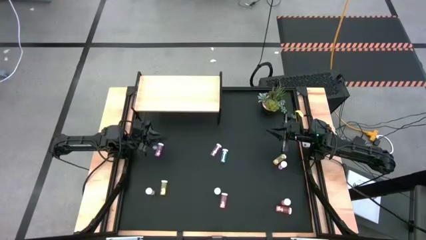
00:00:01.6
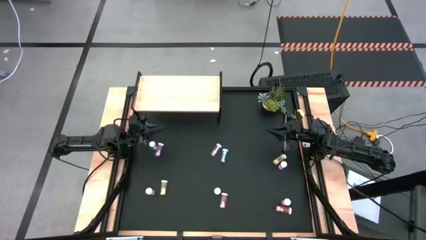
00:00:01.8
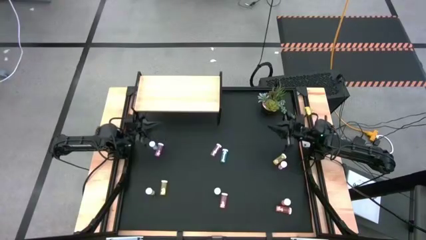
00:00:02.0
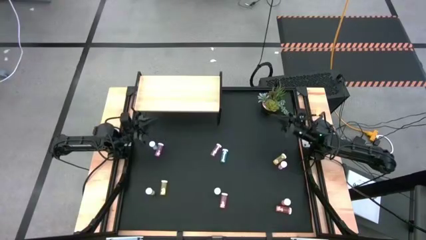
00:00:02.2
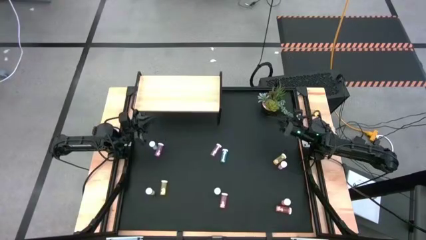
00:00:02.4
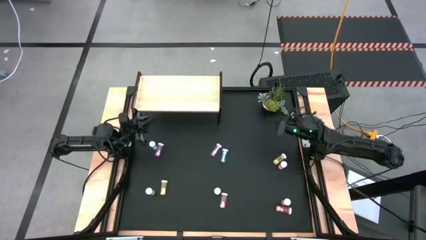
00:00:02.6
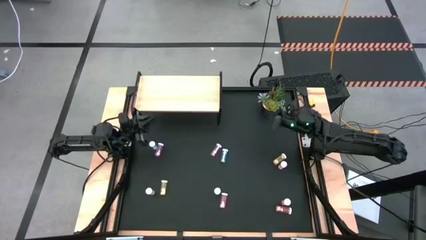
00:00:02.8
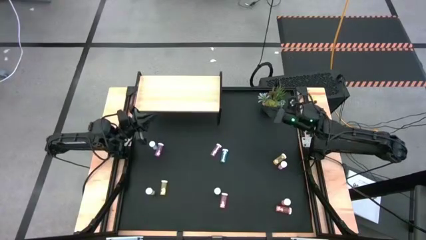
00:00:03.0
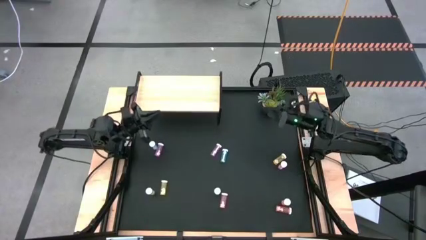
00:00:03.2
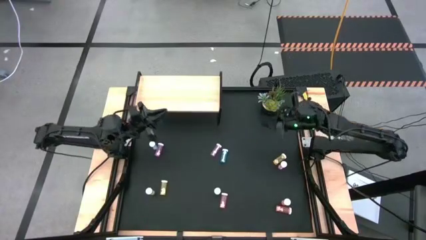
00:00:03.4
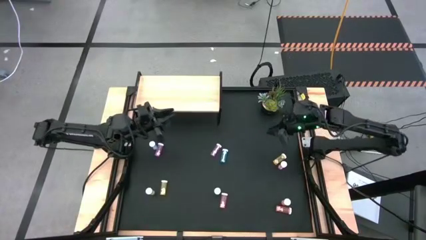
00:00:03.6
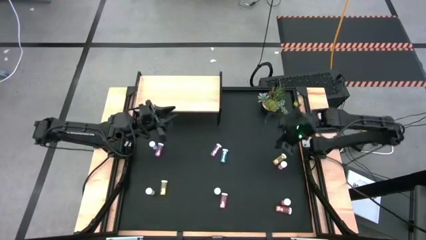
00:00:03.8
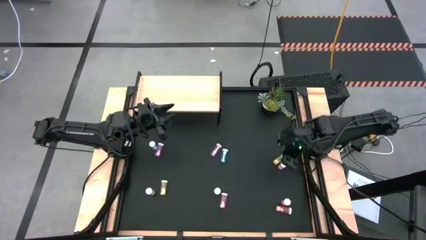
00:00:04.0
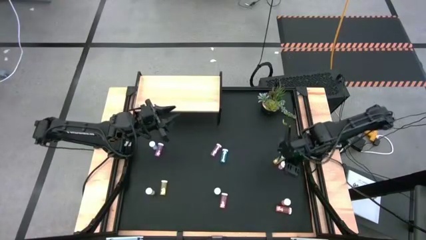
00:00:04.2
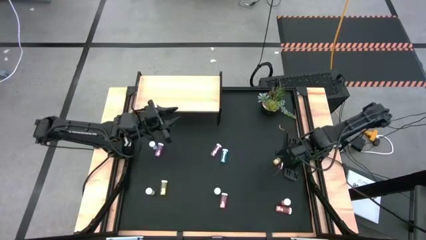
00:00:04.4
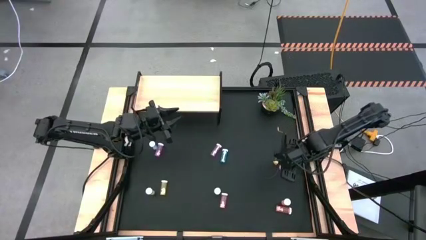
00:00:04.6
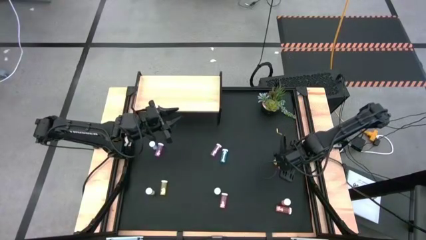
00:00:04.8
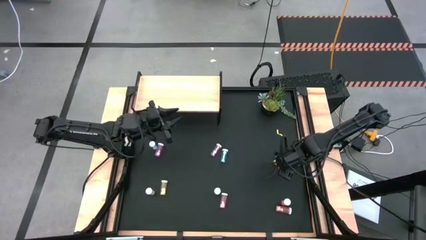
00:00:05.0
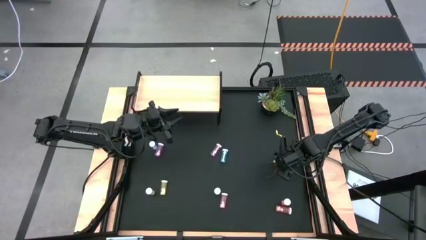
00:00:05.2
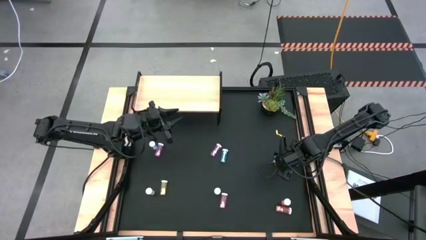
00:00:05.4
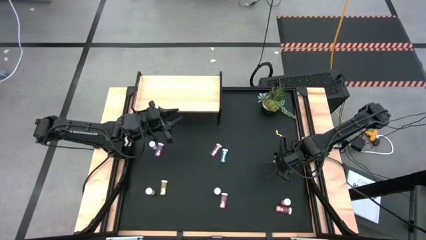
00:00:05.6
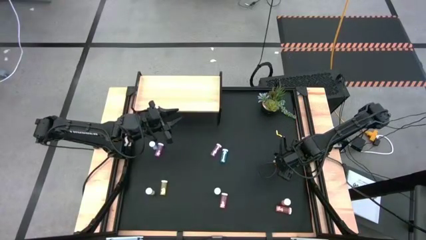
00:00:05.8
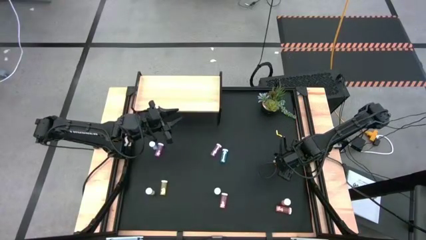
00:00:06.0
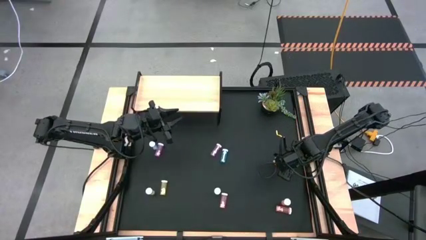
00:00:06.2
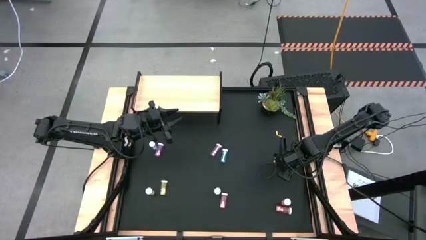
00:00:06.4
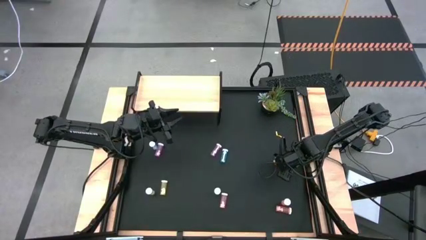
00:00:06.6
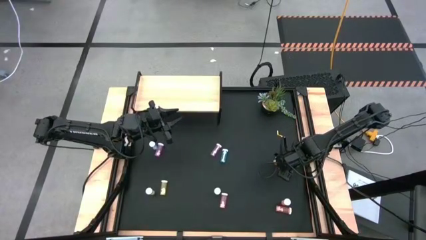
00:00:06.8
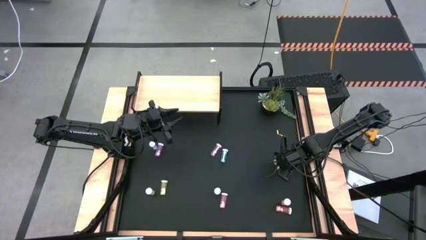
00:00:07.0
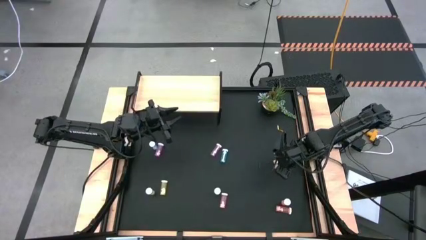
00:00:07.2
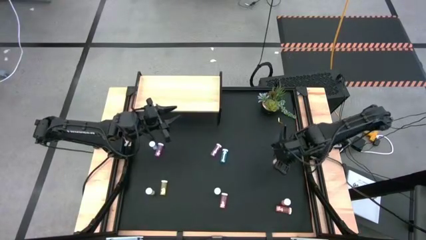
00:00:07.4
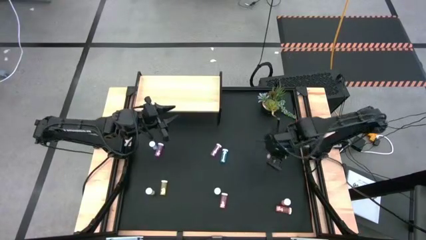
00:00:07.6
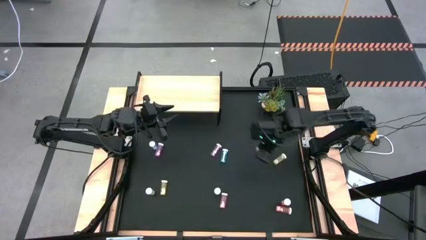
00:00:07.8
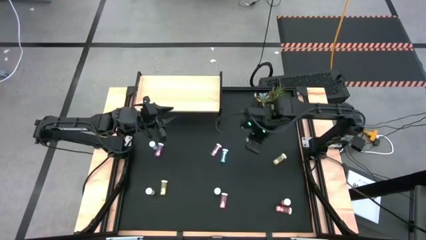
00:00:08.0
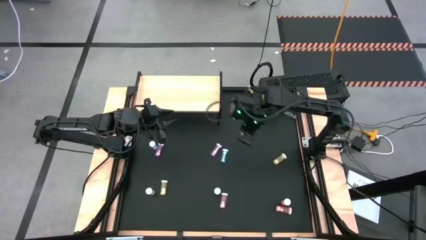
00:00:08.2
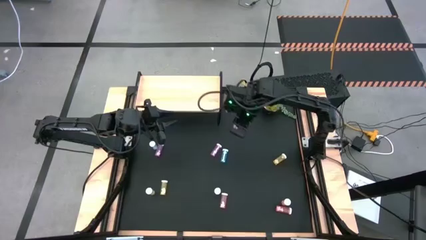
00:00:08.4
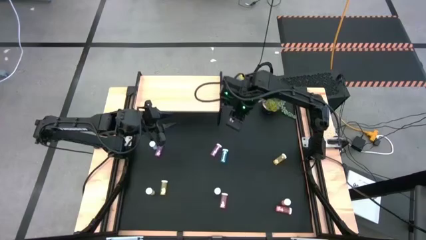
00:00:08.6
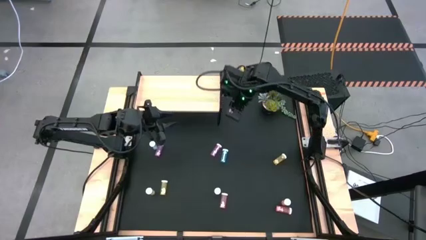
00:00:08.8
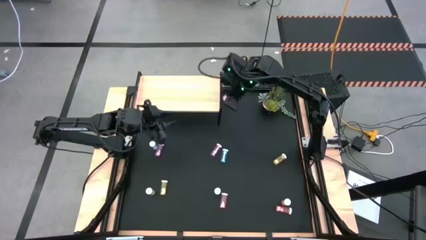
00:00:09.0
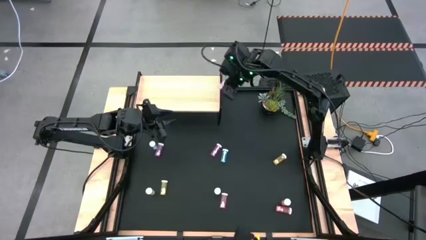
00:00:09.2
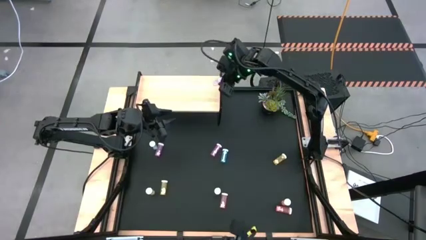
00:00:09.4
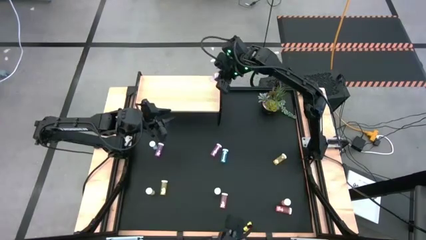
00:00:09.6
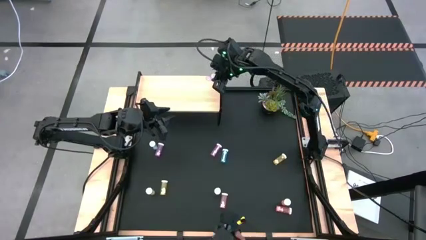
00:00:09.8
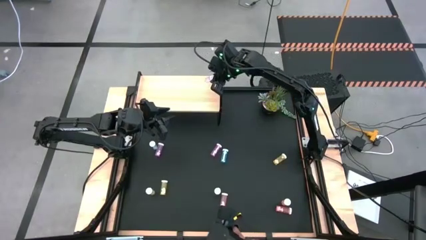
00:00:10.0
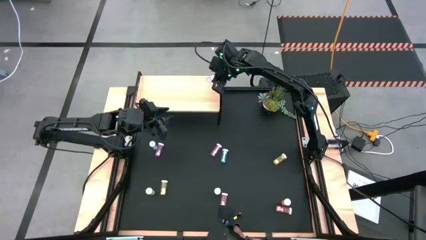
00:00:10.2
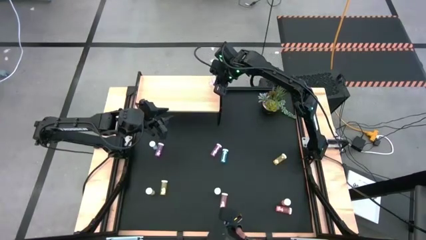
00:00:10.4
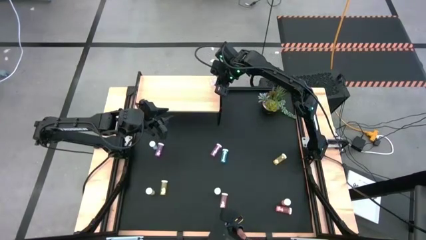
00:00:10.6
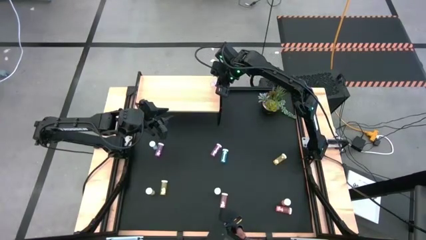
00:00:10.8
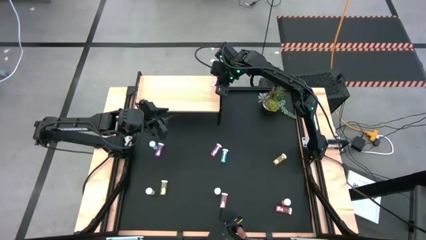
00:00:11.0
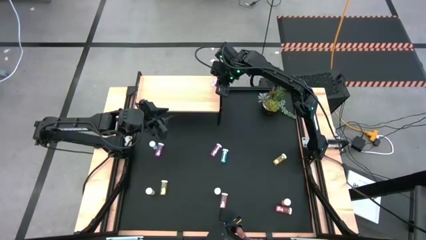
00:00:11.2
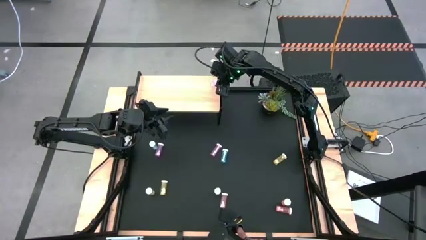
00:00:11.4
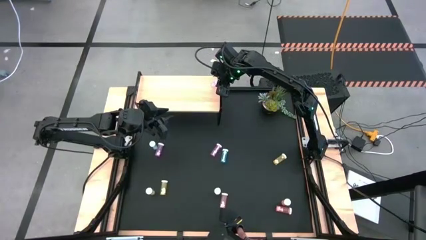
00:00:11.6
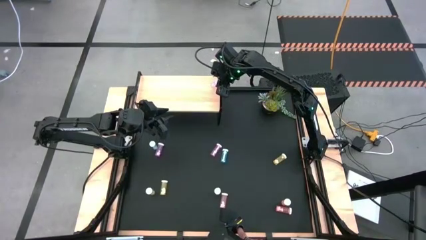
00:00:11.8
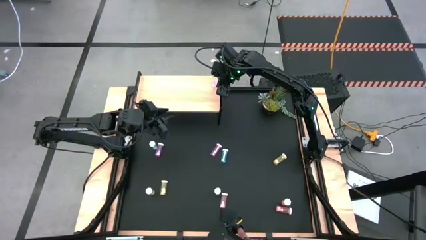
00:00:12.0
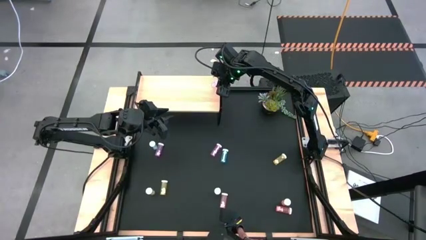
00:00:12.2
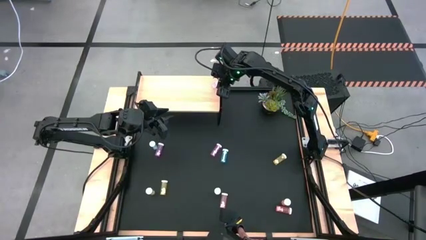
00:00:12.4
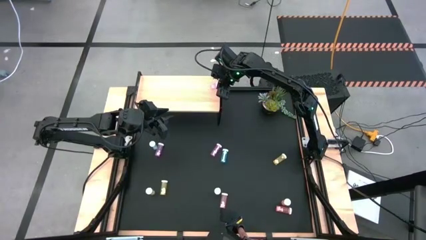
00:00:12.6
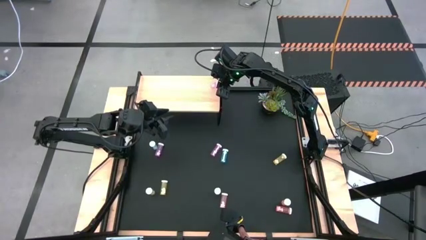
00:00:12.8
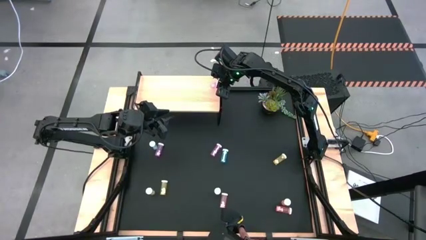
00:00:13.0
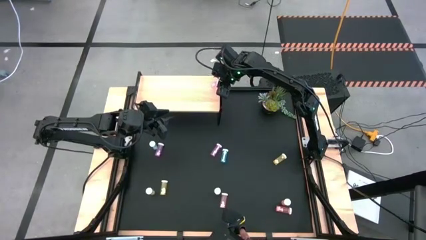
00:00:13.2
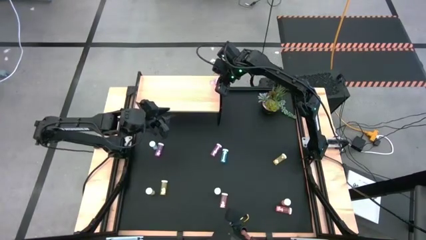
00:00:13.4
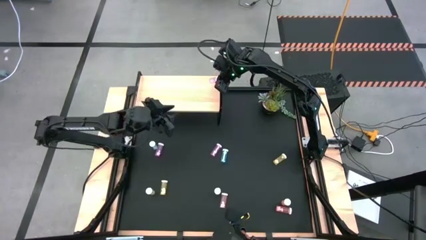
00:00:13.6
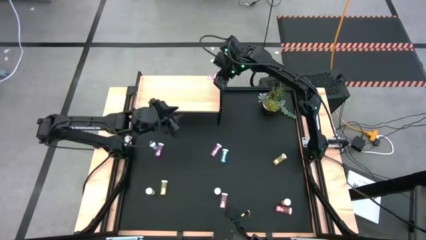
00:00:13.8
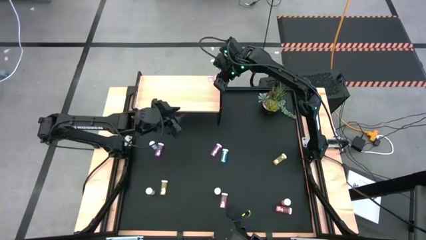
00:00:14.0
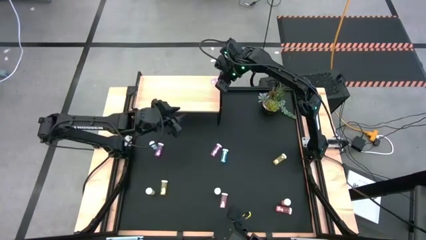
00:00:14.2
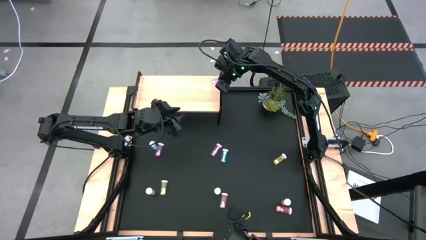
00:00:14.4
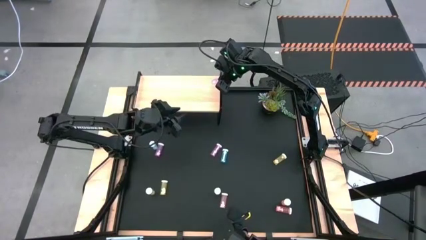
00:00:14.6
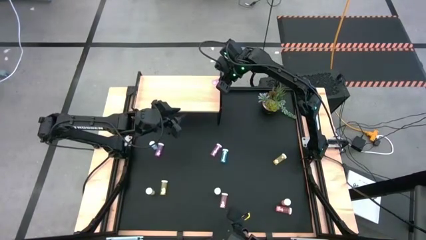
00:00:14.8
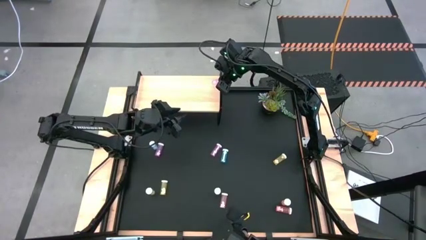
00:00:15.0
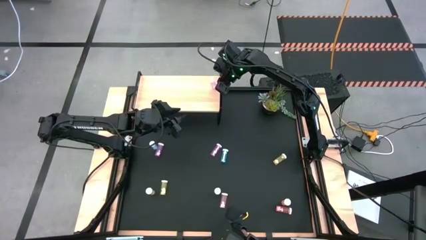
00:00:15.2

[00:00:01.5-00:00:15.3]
Task: Pick and place medicine bottles onto shelf by color
Put the right pink pill bottle on the shelf
